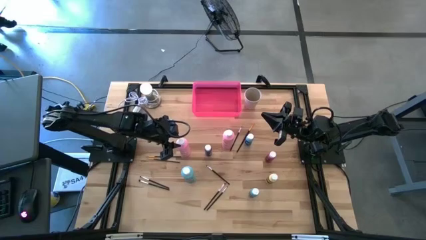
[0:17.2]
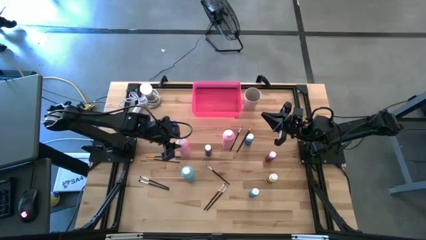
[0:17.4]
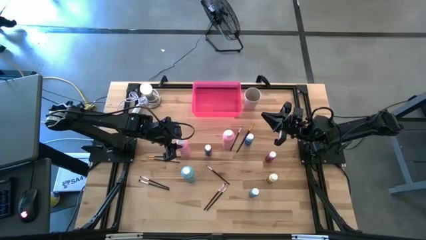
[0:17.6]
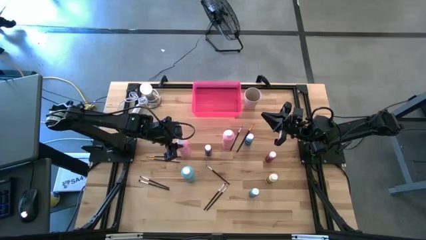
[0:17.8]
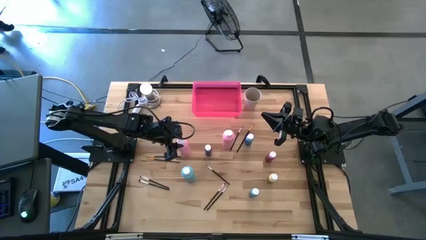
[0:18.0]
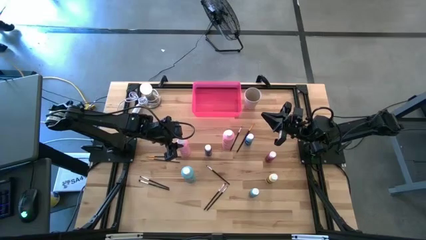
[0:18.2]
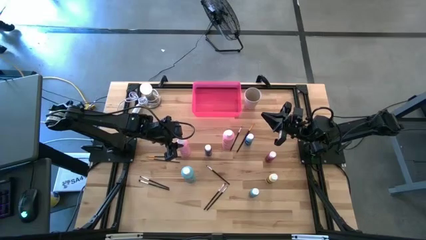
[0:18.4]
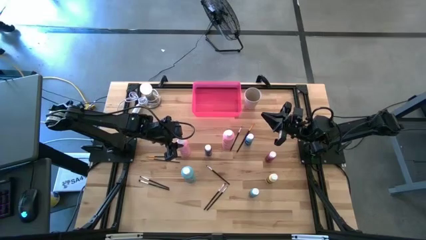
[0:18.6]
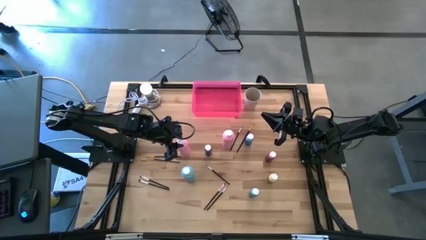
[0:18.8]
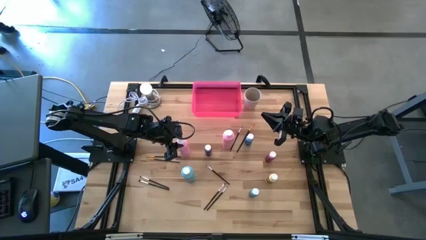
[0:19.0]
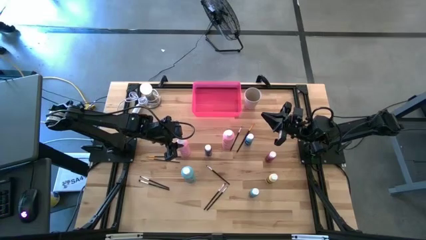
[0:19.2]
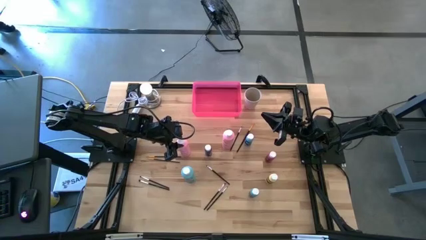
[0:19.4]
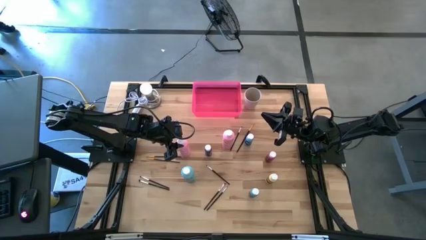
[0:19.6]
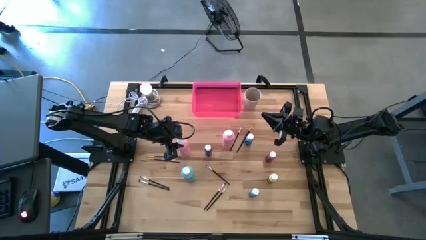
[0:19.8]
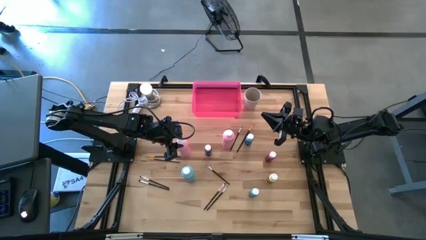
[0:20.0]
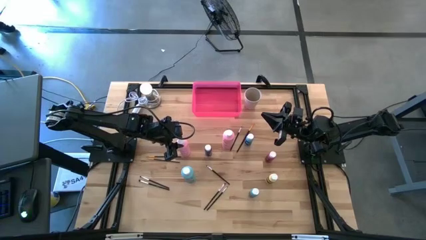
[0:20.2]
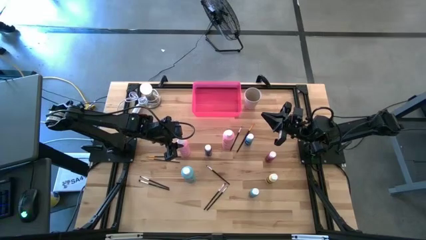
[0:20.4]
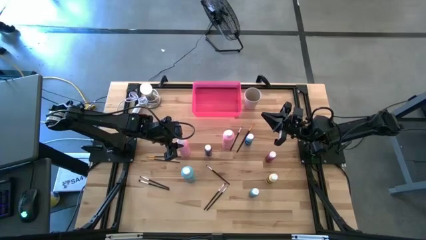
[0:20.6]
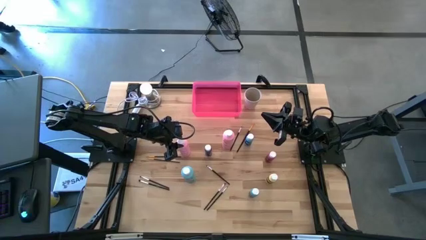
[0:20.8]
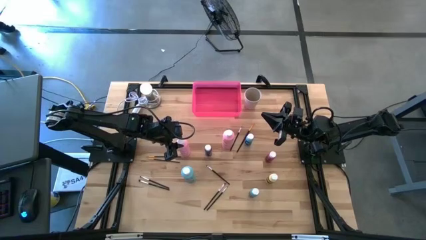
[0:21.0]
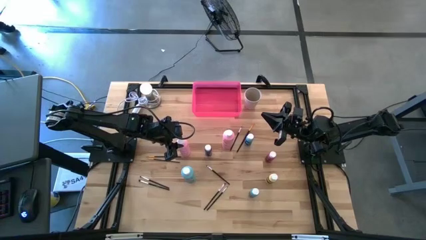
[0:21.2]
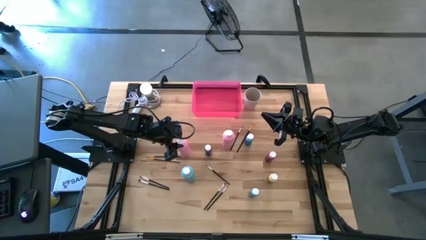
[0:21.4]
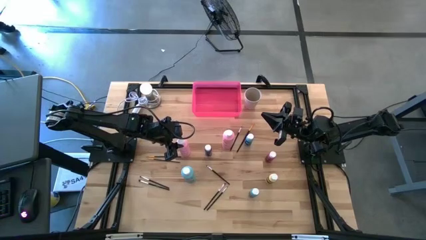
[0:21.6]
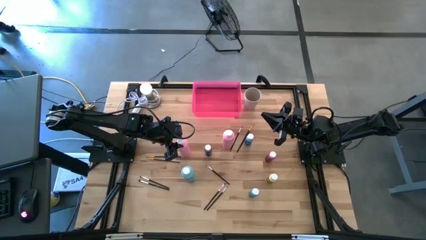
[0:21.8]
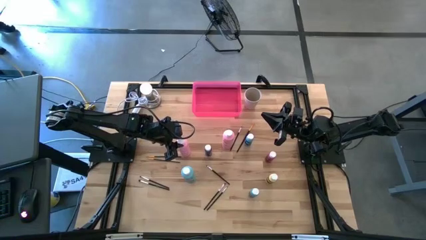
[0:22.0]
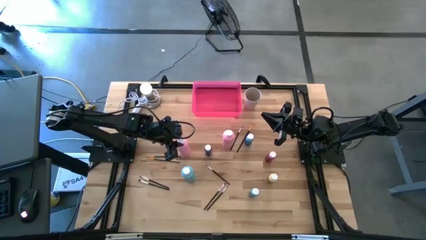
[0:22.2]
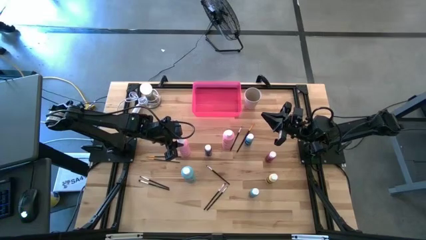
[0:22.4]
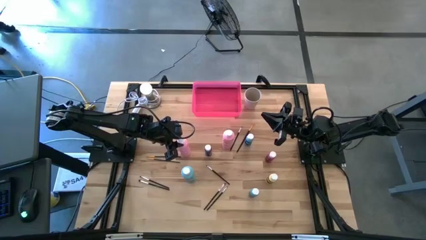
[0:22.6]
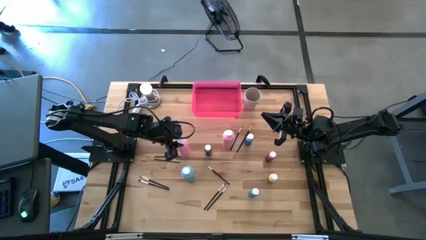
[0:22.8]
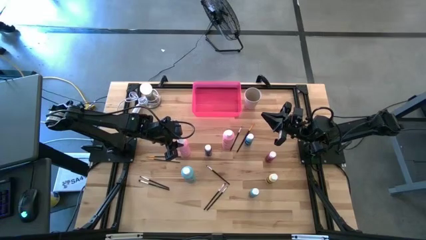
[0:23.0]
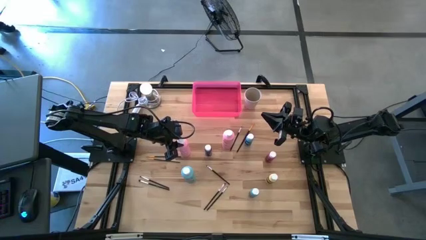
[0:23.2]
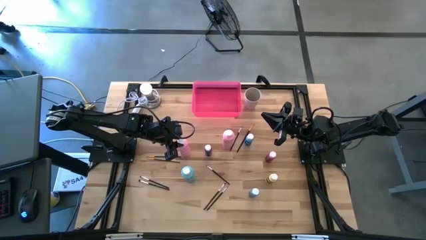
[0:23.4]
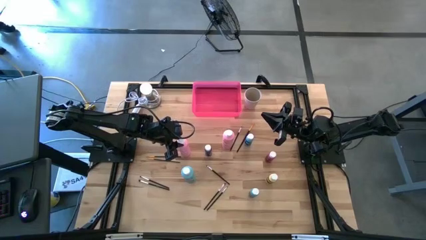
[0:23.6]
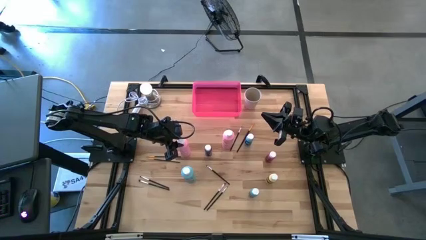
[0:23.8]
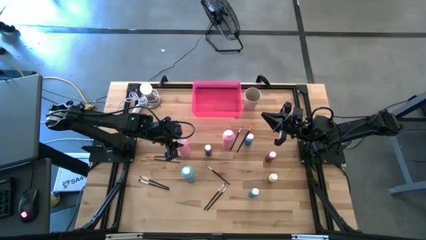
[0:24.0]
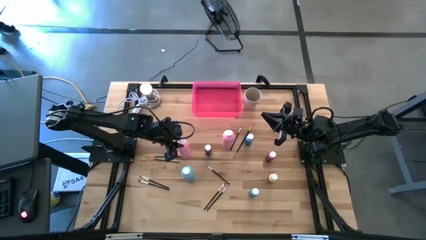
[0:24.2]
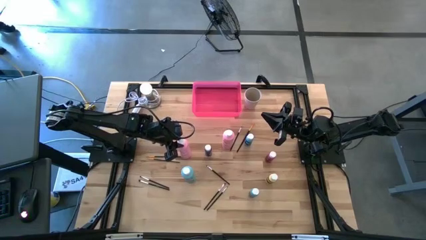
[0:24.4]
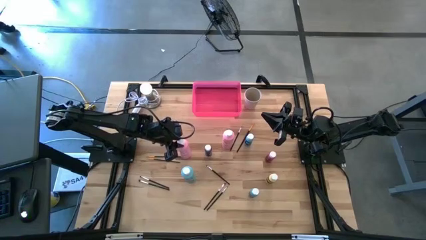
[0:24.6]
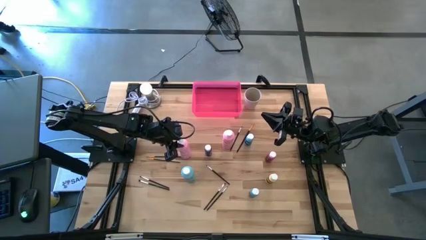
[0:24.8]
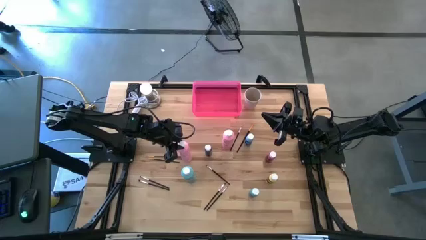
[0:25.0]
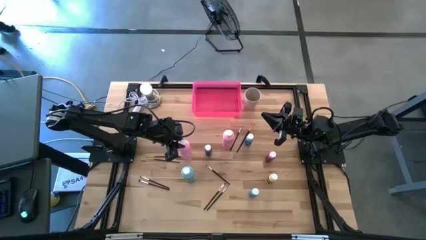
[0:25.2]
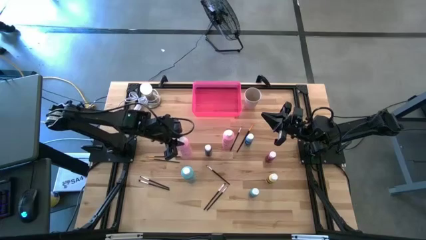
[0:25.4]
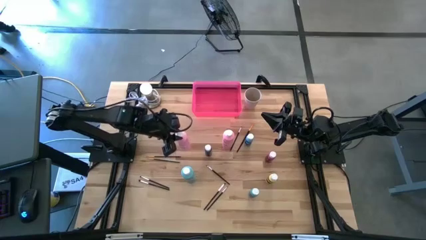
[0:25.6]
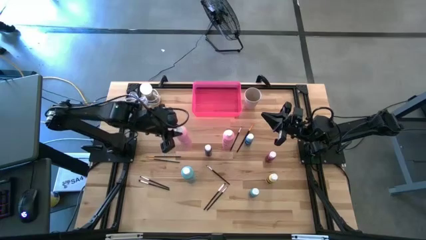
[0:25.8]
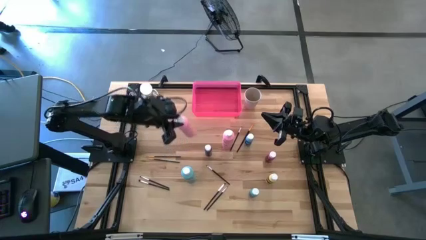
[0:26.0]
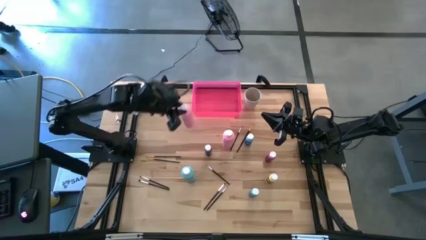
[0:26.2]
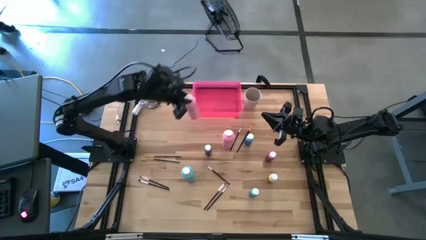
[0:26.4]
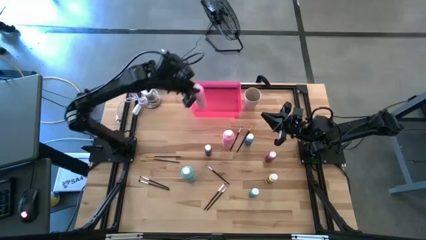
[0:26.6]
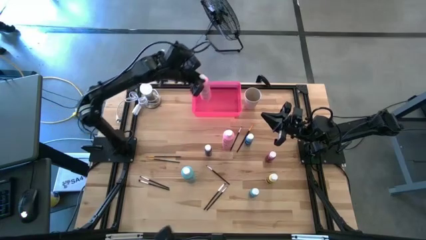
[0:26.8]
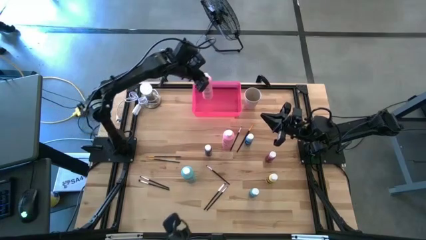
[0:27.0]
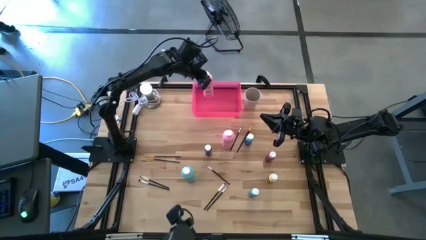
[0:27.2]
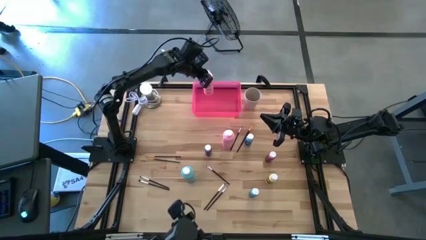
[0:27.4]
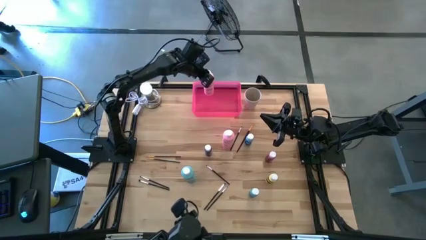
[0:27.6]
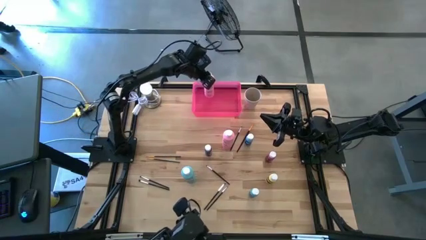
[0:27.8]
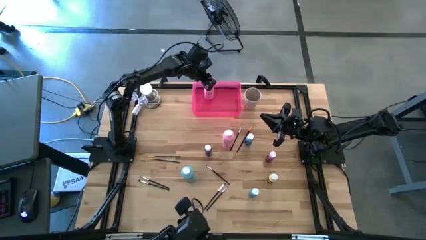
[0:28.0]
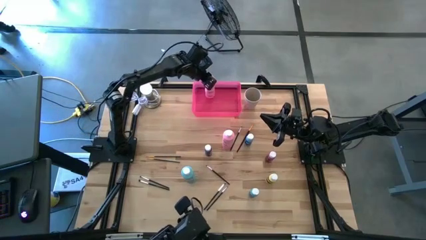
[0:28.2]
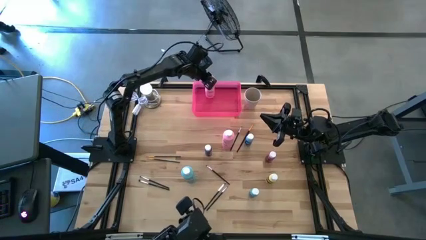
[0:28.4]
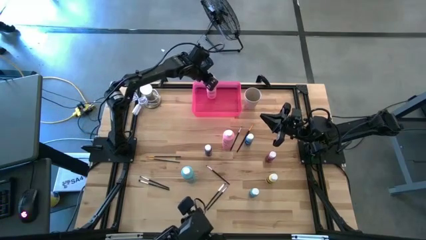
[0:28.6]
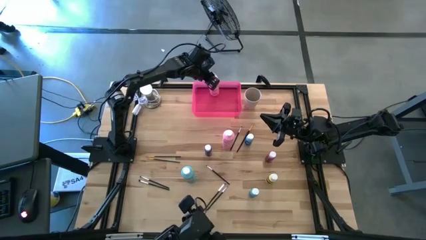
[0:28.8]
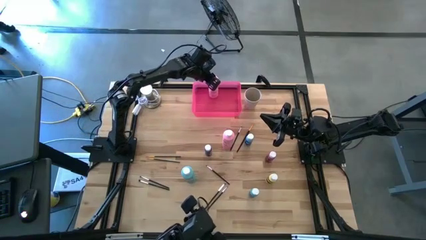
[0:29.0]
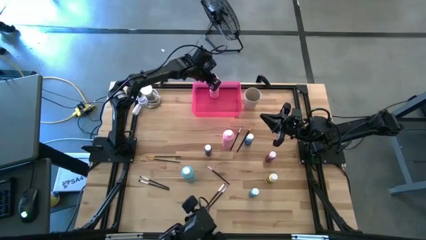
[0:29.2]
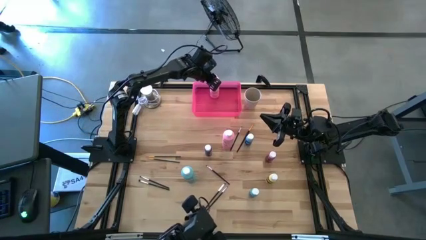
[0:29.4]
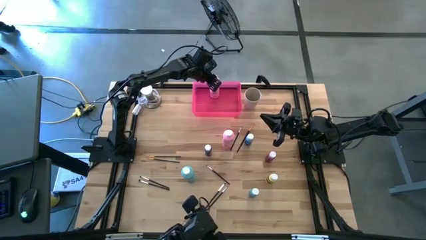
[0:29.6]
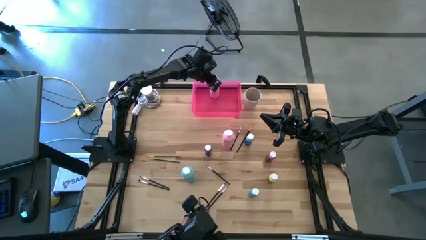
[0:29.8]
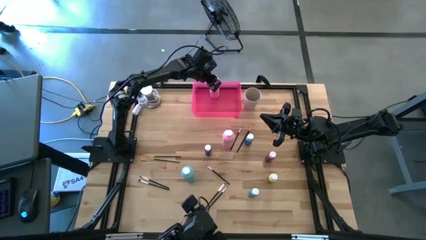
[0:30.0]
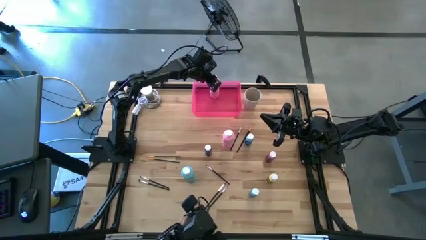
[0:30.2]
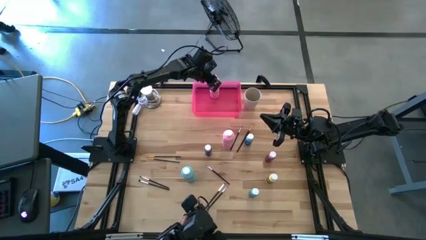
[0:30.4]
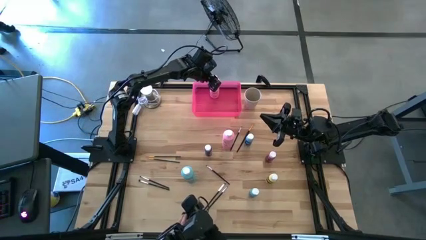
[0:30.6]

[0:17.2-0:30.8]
Task: Pick & Place Paint Supplies
Put the big pink paint bottle into the pink bin
